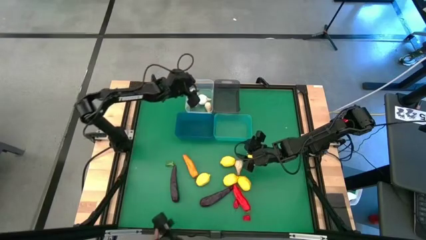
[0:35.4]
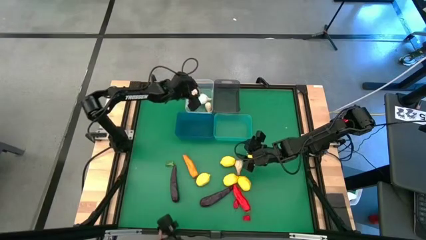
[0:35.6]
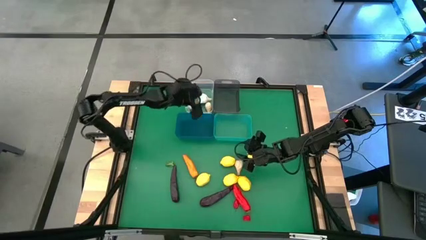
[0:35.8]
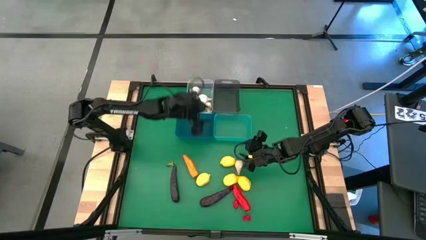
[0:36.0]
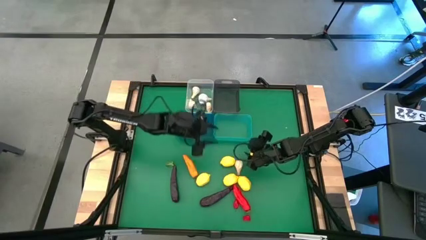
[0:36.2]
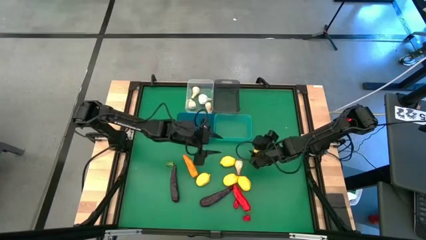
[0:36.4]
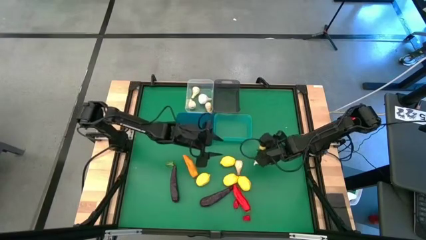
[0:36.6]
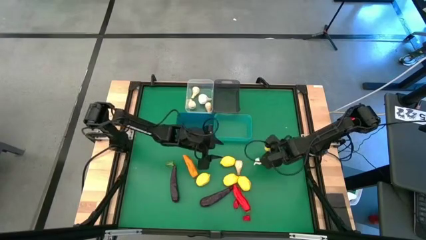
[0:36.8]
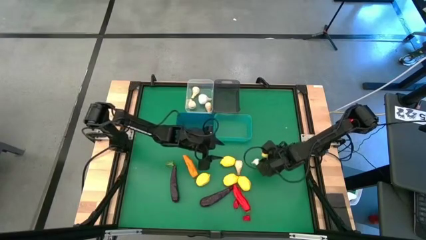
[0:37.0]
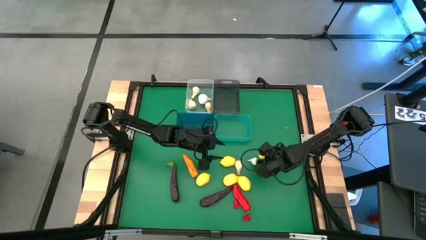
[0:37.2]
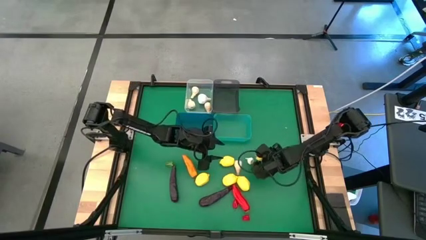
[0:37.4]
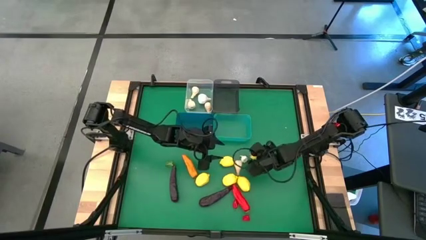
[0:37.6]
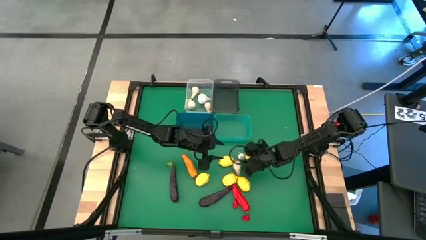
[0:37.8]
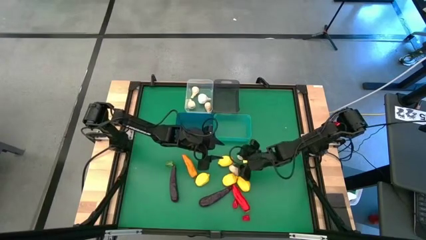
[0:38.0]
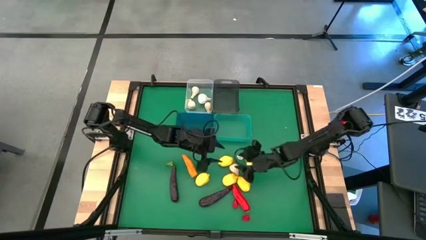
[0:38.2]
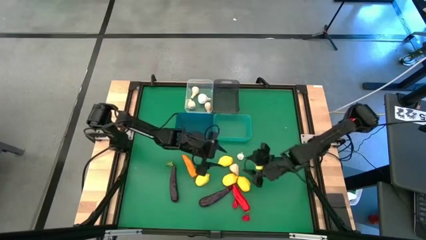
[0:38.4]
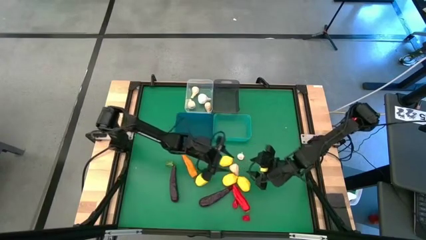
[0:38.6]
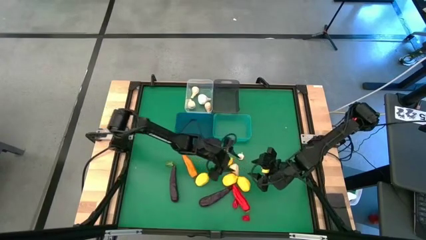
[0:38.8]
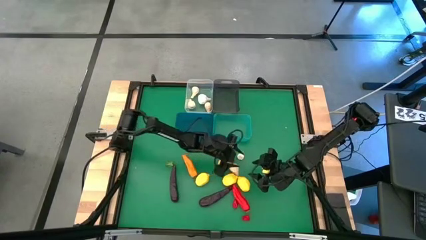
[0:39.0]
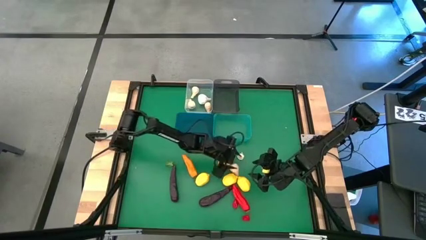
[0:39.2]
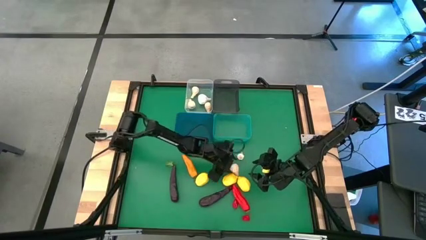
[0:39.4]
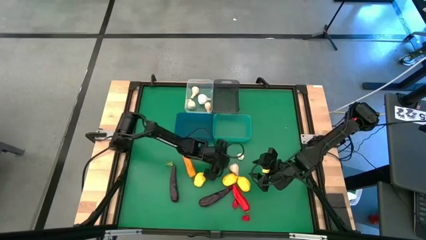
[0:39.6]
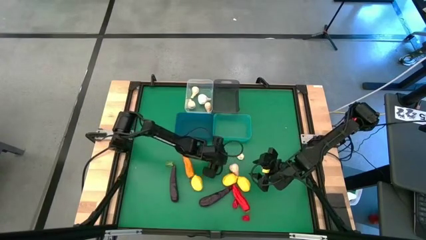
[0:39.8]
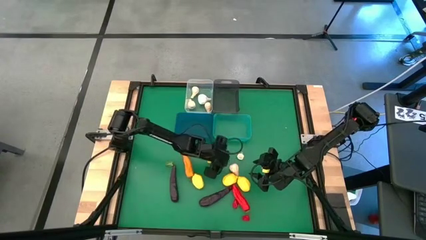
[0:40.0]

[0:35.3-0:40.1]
Task: Sort produce into baskets
Adjust the white garlic and yellow lemon on the table

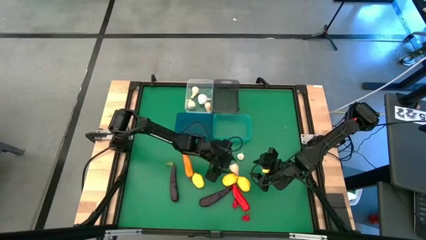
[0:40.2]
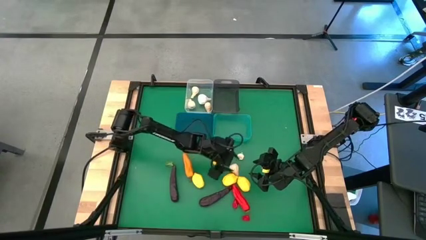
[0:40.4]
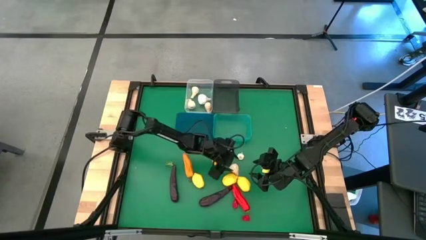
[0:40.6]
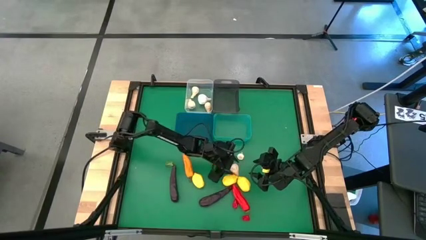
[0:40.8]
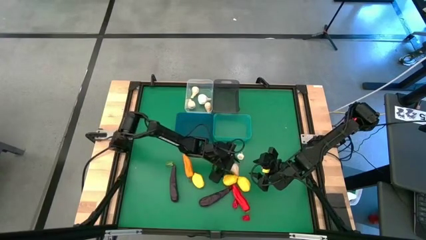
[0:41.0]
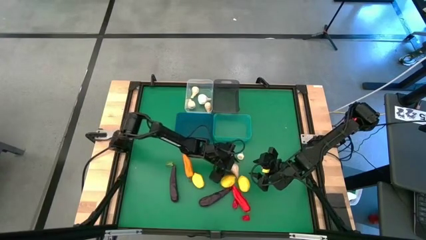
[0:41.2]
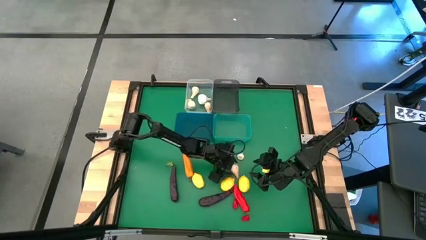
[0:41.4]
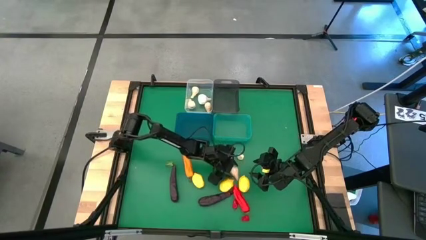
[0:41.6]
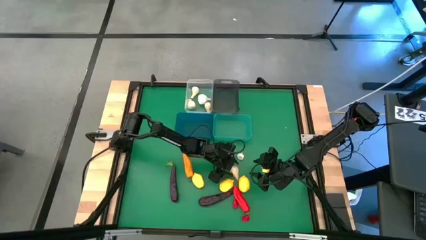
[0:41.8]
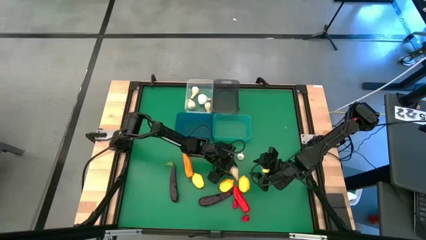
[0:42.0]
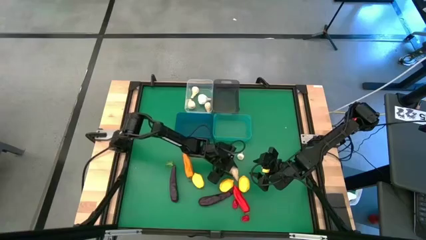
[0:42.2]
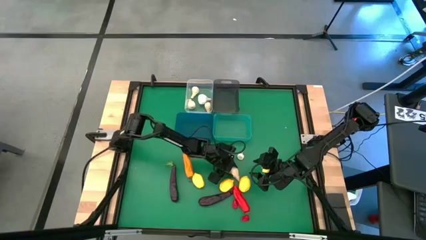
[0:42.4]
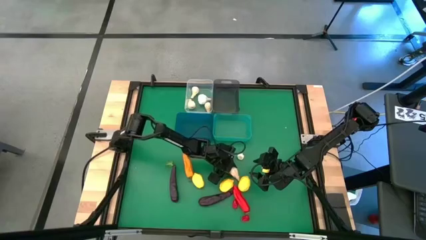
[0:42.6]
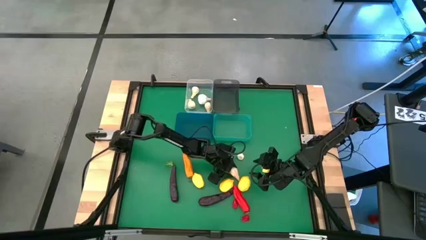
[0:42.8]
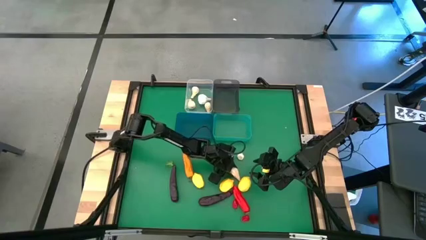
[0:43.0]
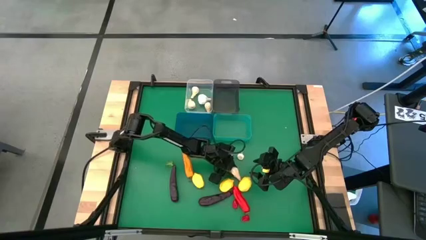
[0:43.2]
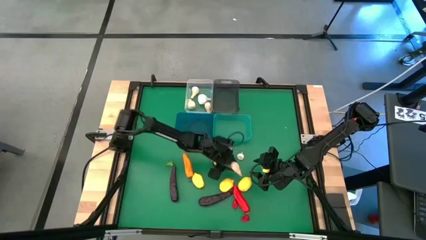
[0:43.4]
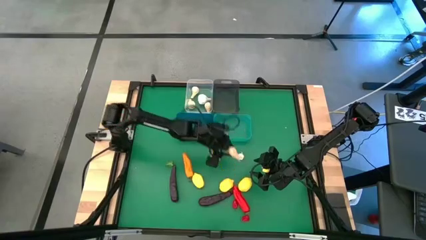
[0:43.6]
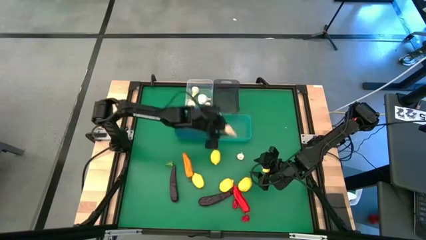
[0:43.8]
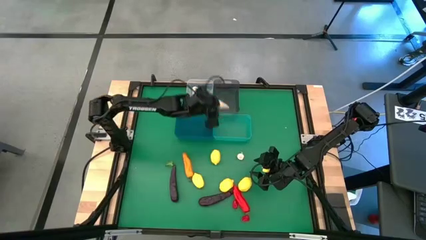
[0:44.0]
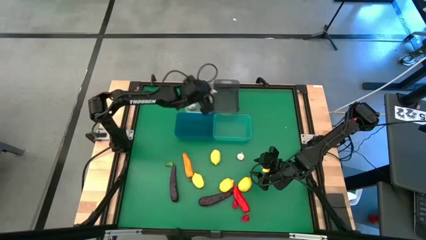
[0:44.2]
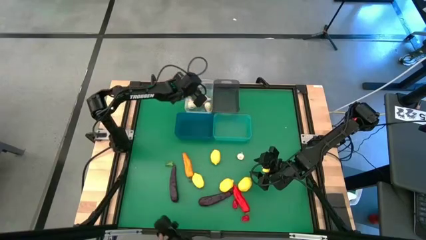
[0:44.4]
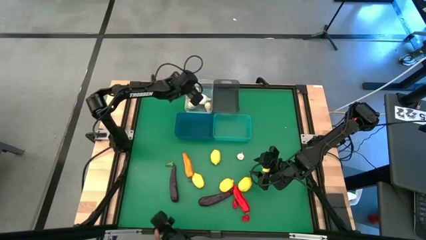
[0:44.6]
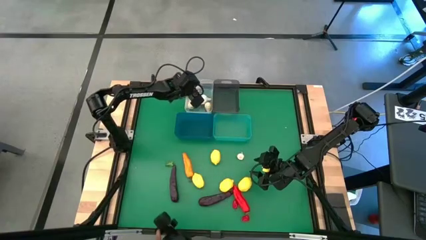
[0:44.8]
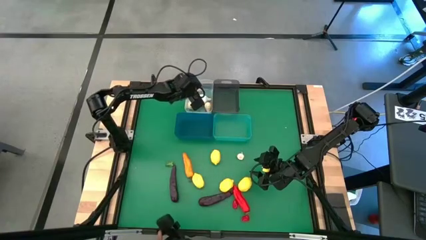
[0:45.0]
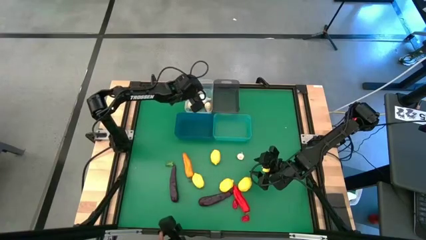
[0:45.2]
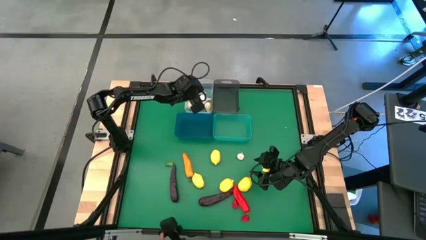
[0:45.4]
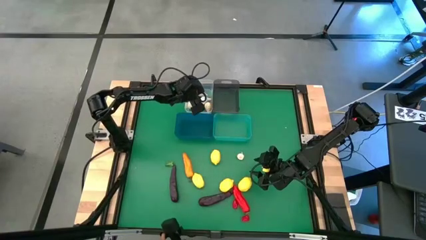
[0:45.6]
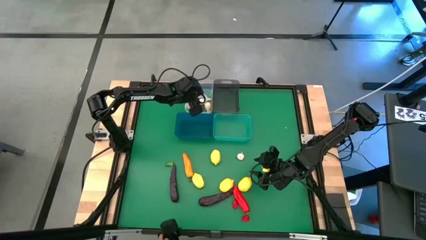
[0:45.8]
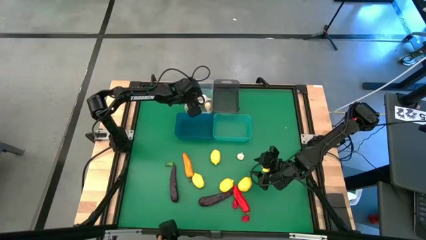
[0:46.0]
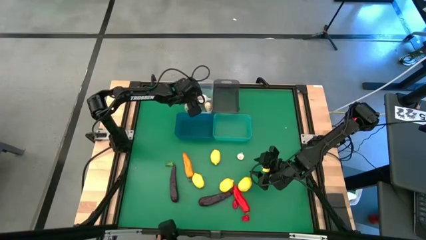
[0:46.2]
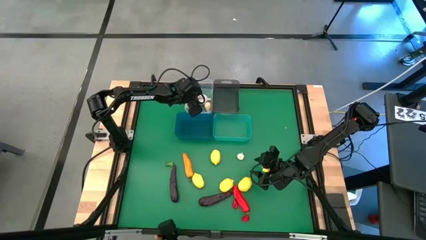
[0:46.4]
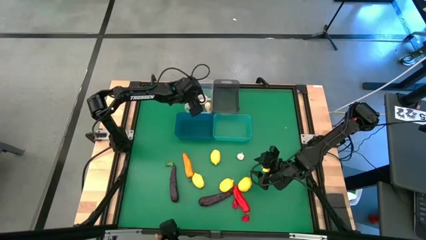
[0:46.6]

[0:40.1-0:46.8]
Put the white garlic into the transparent bin

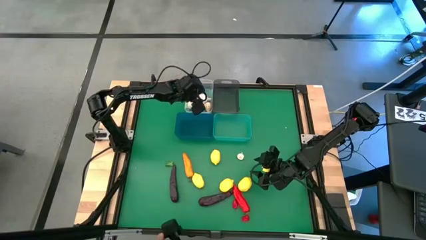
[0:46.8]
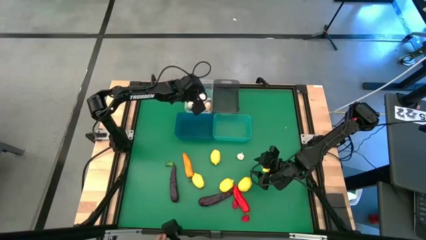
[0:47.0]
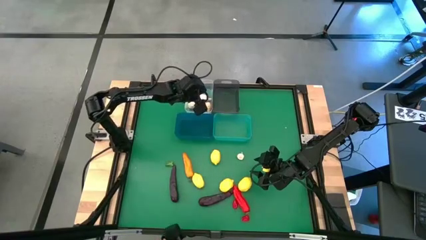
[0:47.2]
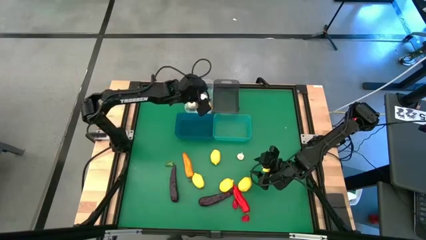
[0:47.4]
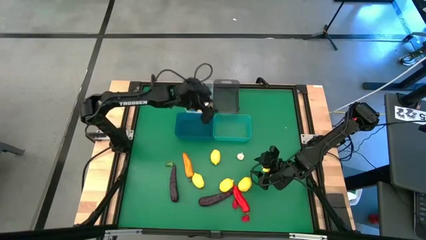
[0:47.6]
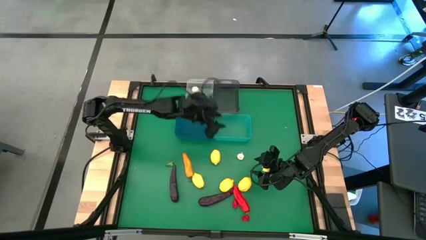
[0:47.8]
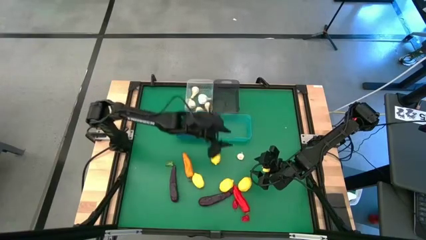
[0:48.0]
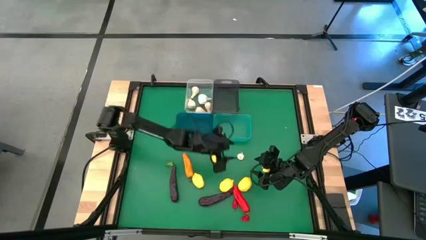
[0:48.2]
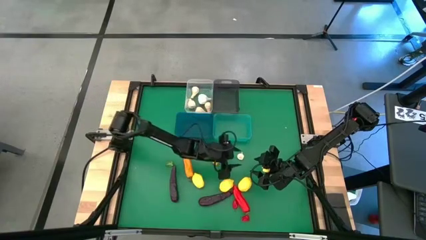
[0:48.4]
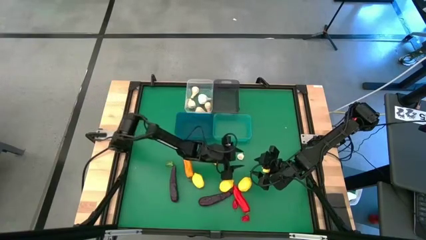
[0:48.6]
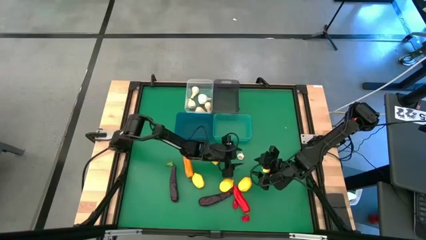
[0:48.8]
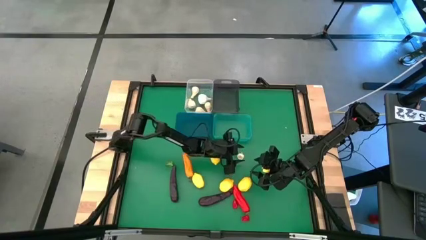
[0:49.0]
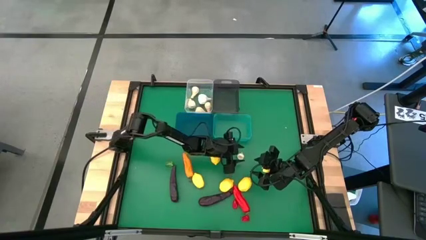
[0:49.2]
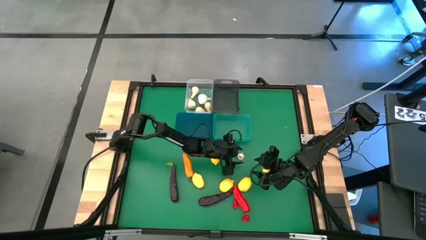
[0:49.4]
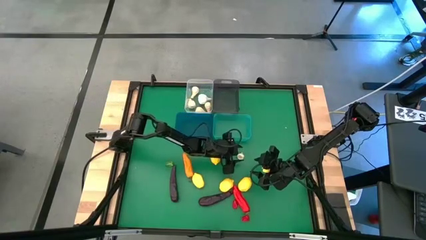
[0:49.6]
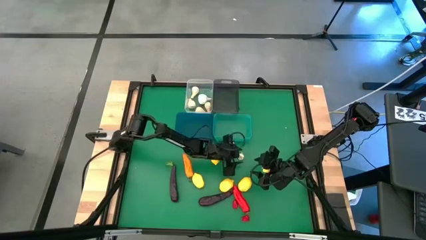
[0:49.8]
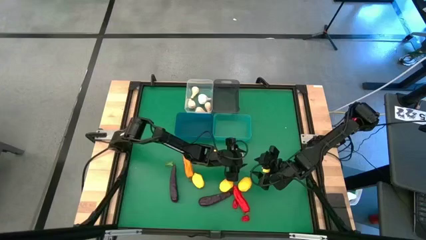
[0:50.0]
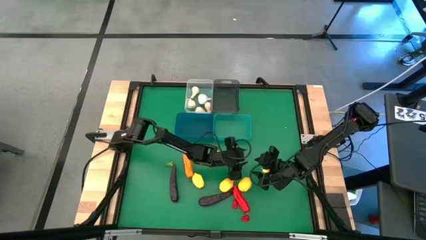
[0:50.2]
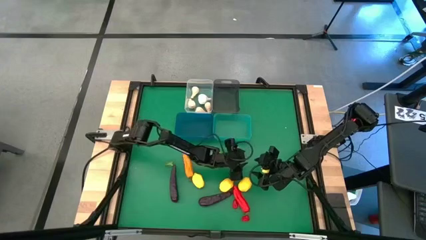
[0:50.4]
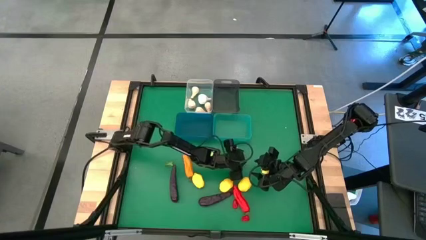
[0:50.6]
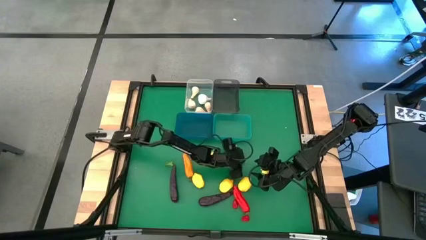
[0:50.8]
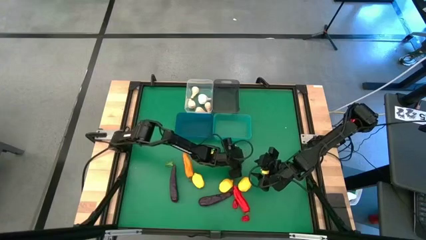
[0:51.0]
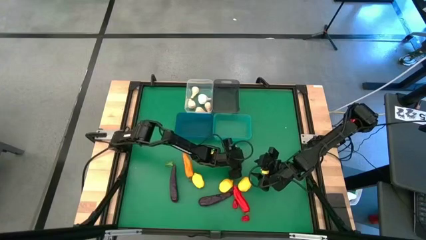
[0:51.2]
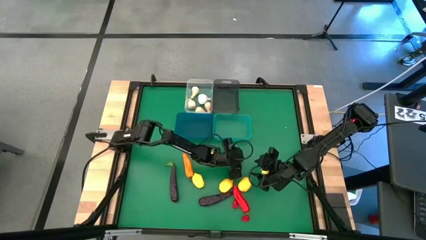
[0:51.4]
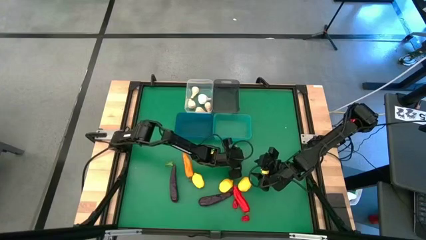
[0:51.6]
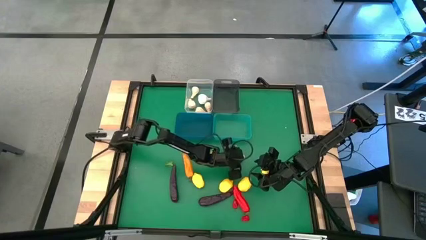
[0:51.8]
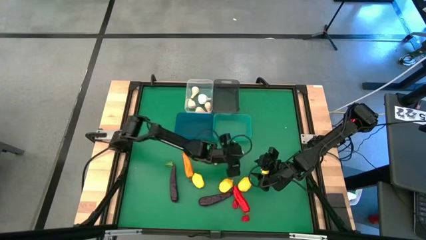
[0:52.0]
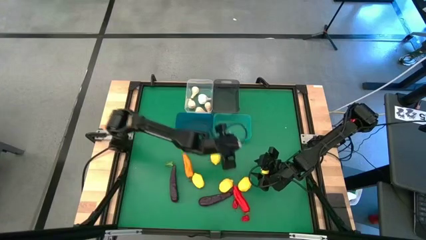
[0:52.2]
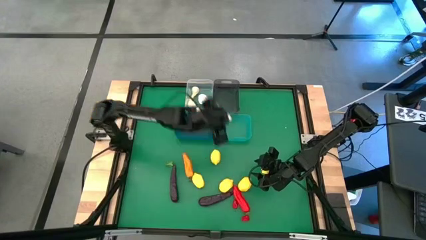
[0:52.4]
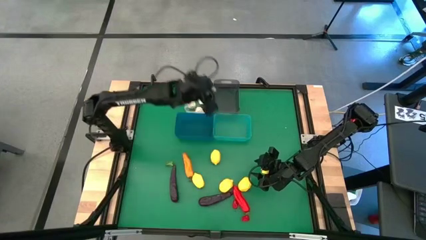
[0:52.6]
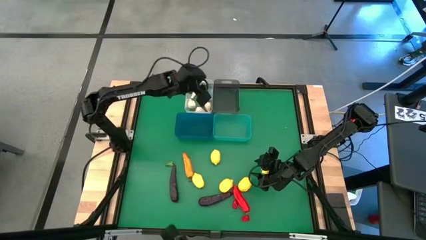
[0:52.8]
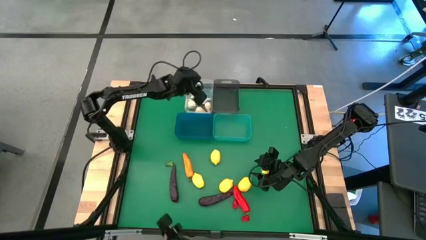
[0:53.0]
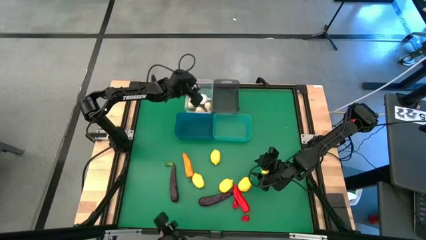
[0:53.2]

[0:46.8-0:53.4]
Put the white garlic into the transparent bin
